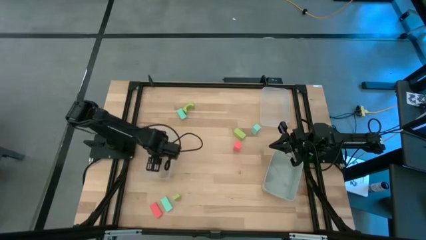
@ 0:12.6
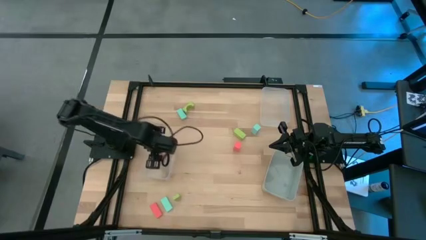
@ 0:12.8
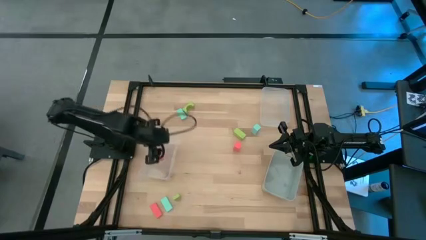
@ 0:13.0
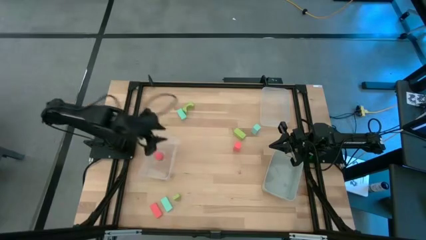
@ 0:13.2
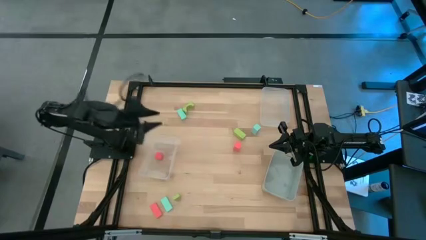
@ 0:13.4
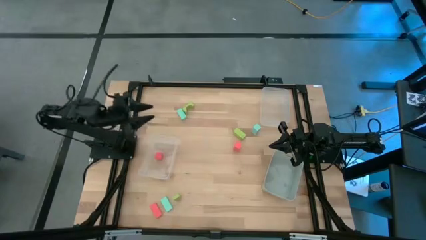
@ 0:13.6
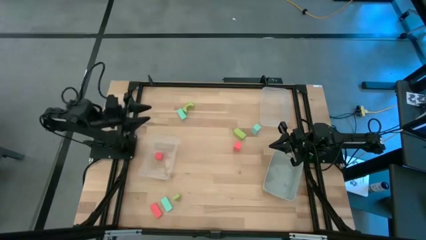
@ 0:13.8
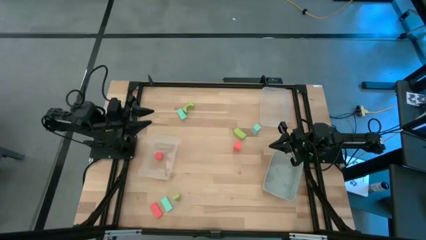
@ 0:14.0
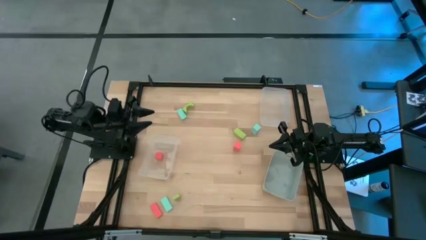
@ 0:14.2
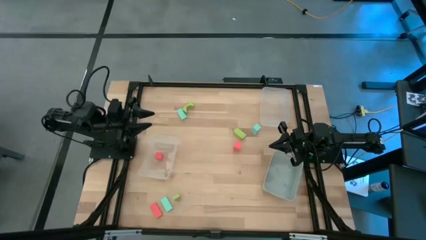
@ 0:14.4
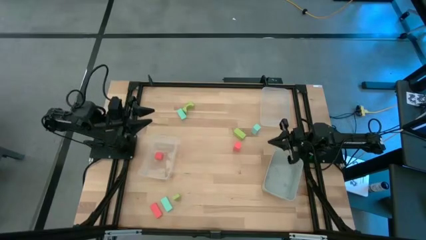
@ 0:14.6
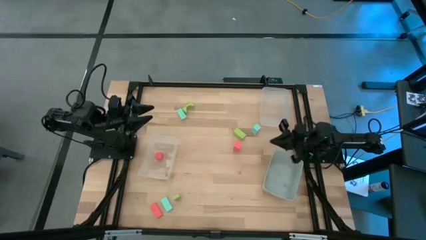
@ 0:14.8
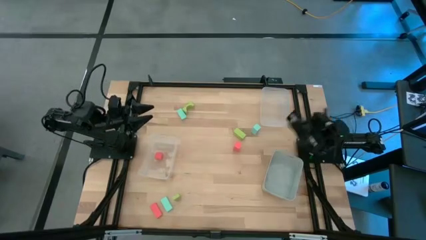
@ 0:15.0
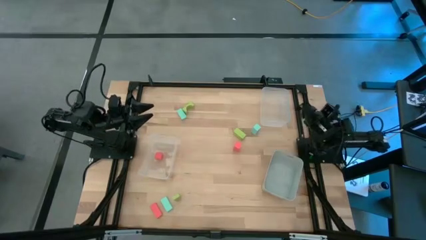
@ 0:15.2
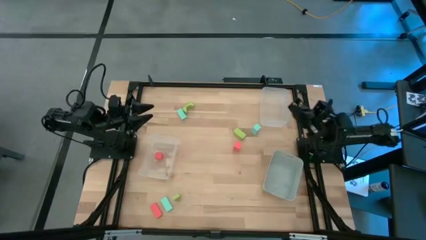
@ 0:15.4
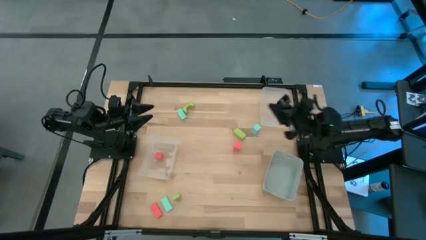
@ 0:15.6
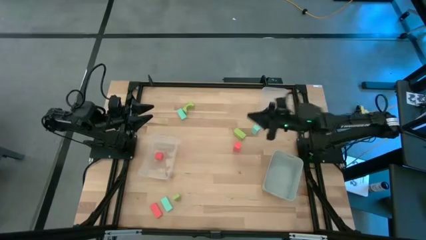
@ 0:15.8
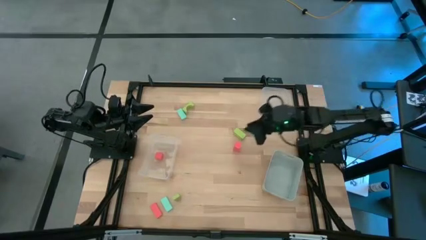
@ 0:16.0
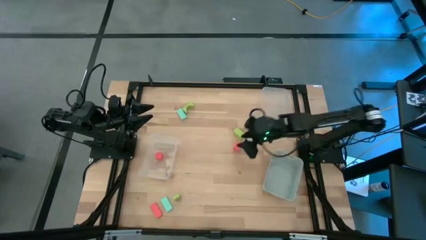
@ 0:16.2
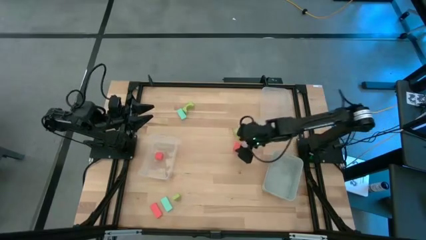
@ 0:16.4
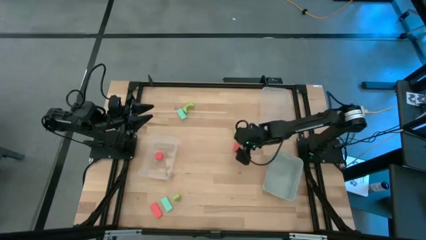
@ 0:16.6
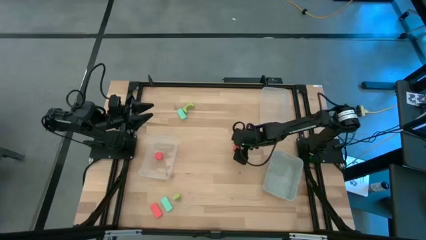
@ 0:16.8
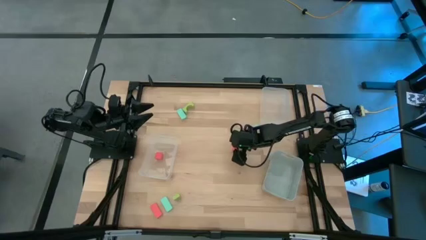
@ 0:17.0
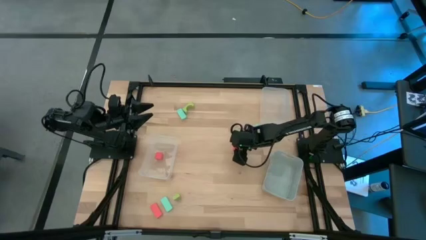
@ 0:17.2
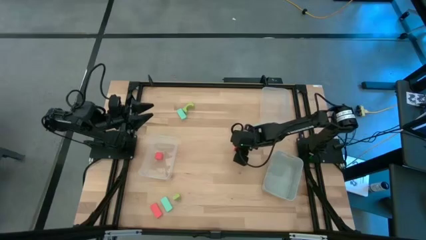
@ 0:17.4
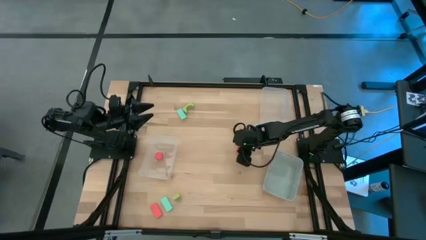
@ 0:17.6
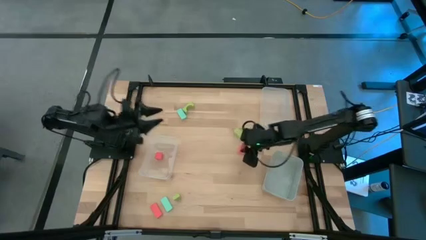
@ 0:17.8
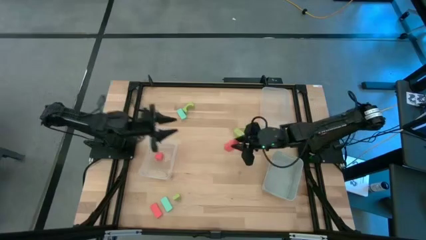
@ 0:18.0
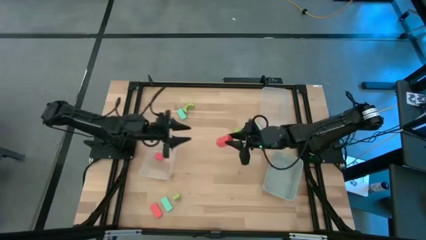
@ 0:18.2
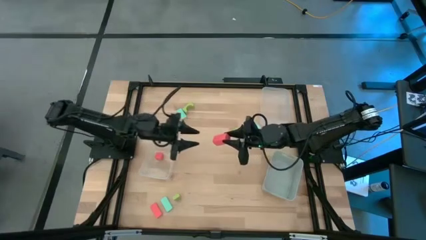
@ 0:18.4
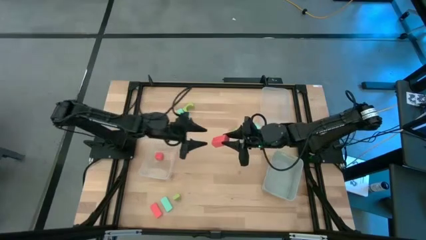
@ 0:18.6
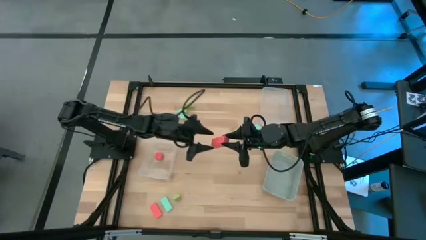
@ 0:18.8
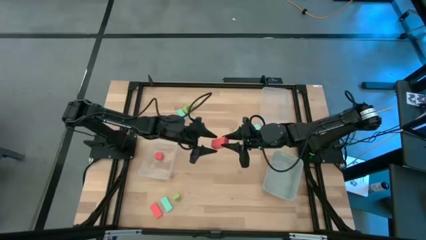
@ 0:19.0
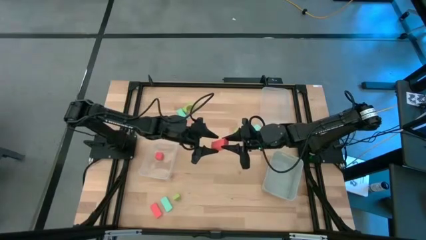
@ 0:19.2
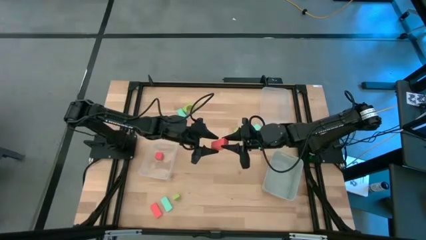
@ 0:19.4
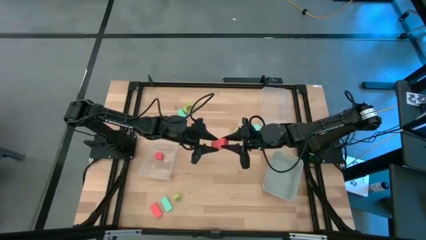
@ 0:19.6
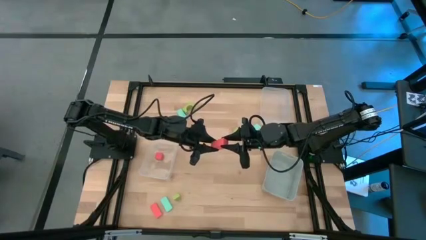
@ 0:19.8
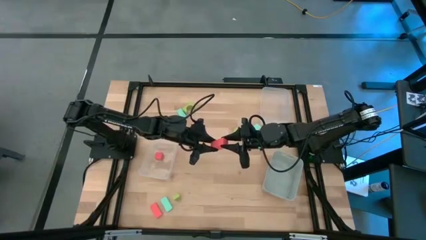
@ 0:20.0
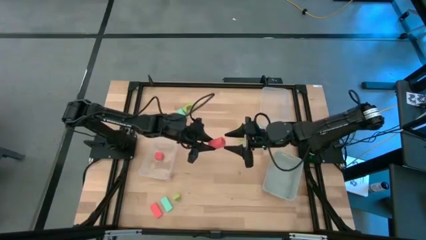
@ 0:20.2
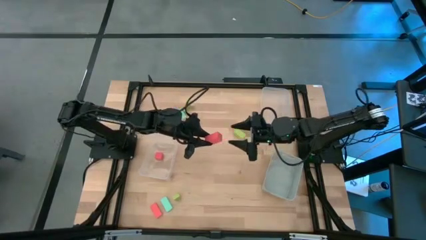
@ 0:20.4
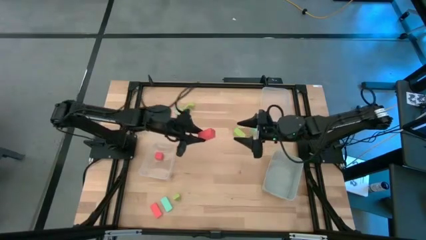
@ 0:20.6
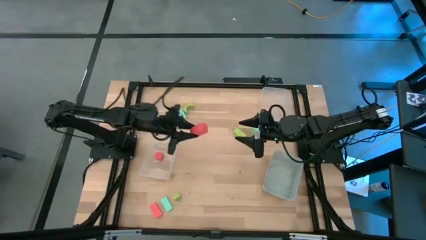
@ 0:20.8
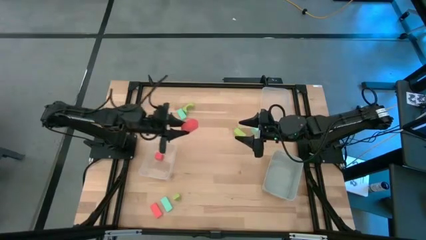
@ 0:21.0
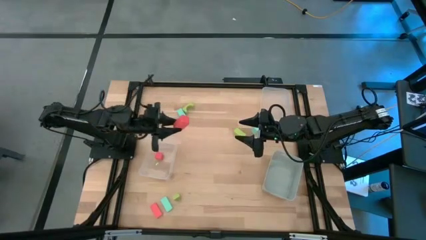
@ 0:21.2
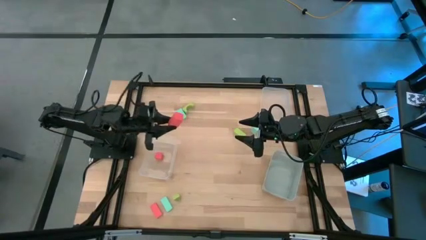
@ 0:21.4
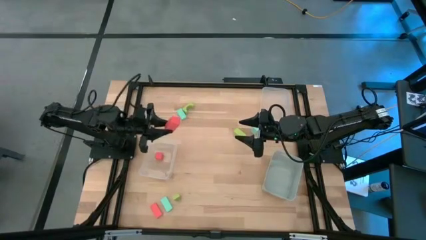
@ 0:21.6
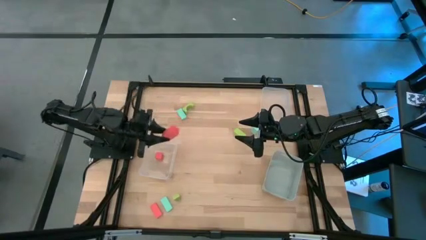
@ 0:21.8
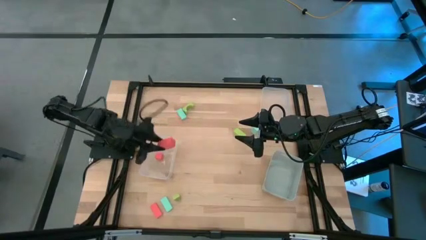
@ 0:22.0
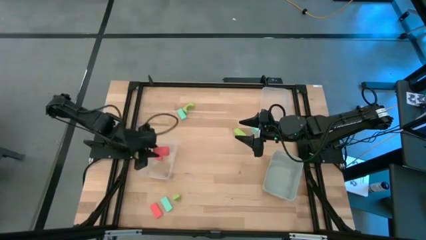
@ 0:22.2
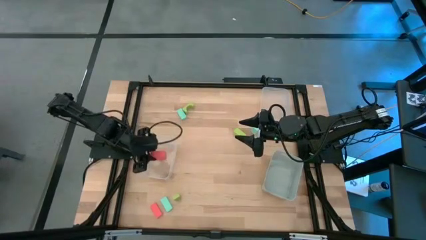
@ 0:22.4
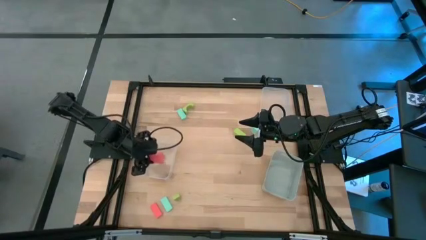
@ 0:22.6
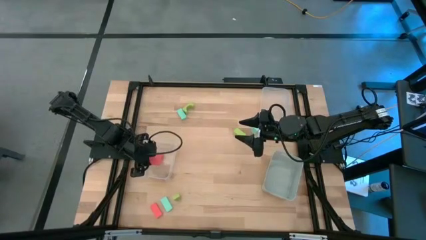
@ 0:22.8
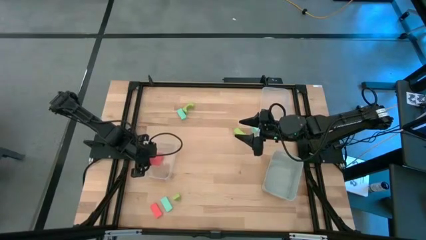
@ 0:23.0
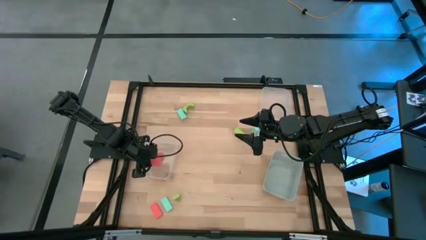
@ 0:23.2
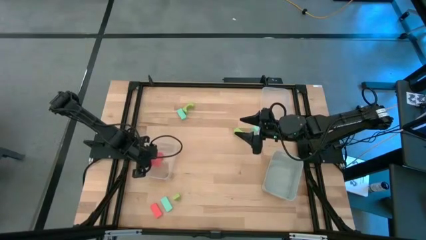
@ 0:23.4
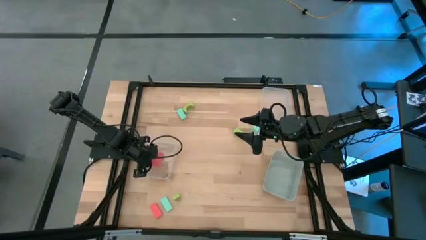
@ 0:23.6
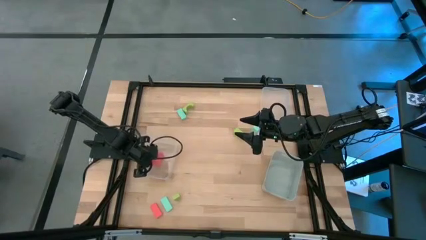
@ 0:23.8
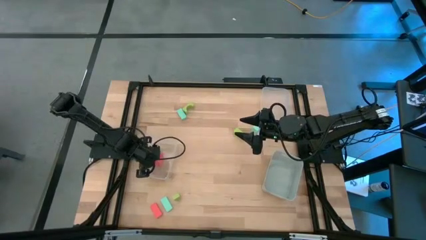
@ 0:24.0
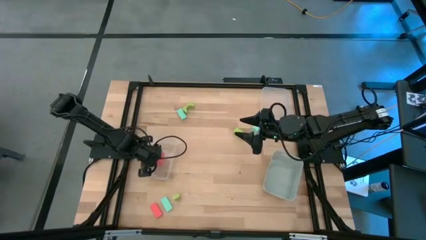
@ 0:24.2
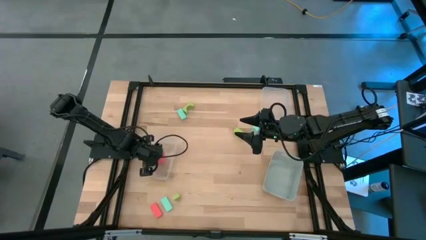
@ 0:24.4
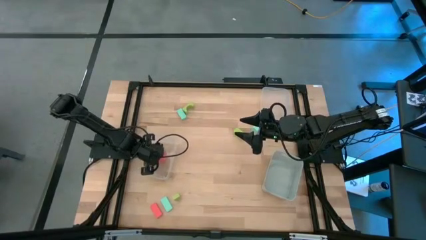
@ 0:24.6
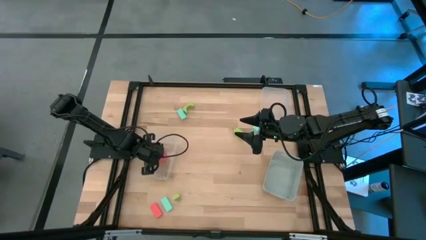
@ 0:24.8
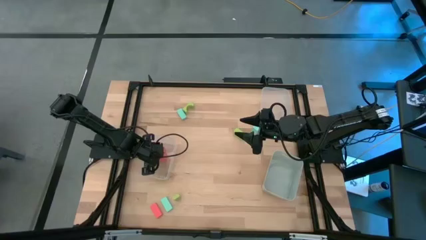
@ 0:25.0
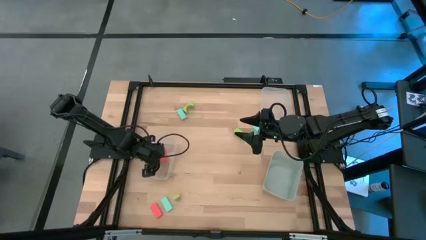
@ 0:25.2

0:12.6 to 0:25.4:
Task: Sort & place blocks by color
Put the top orange block into the bottom transparent bin
